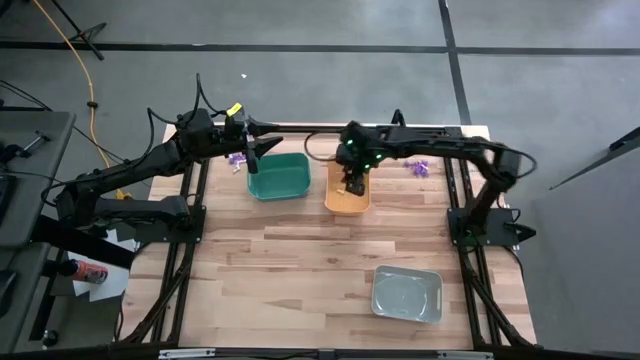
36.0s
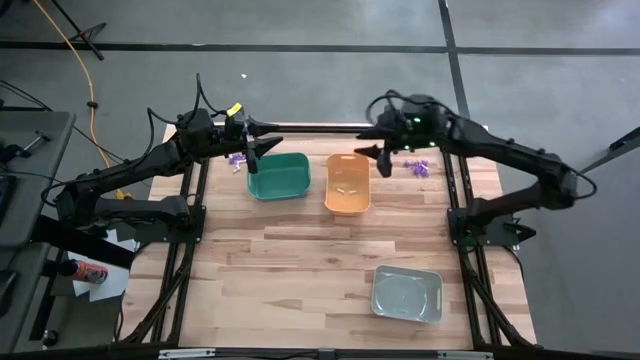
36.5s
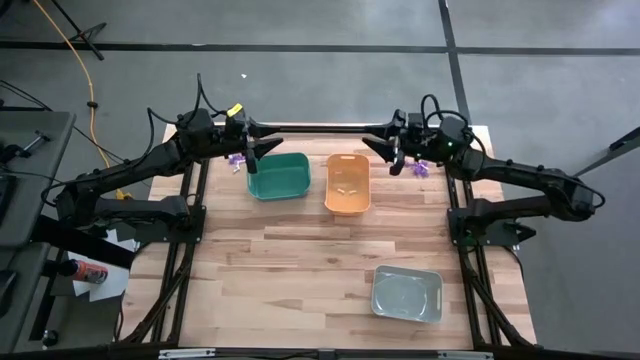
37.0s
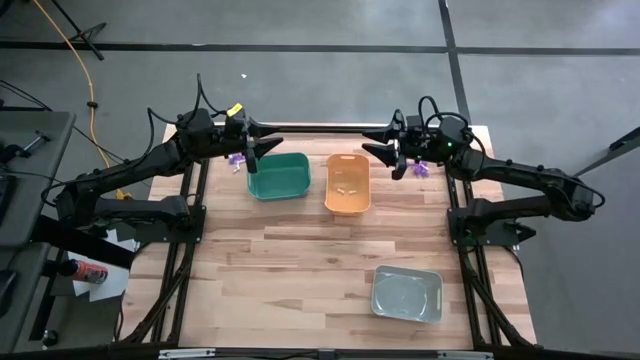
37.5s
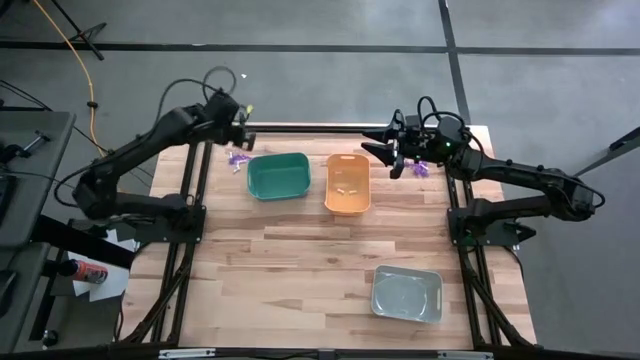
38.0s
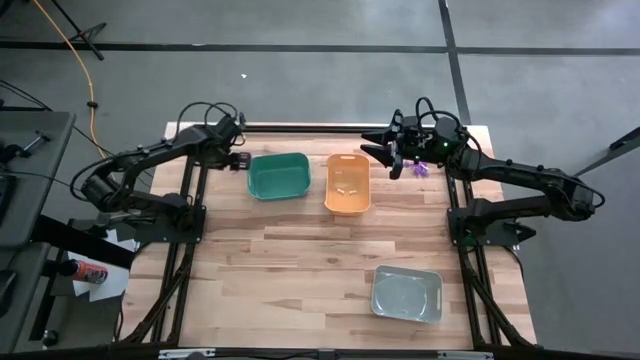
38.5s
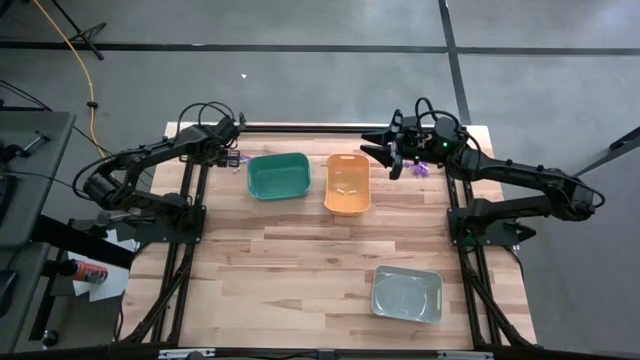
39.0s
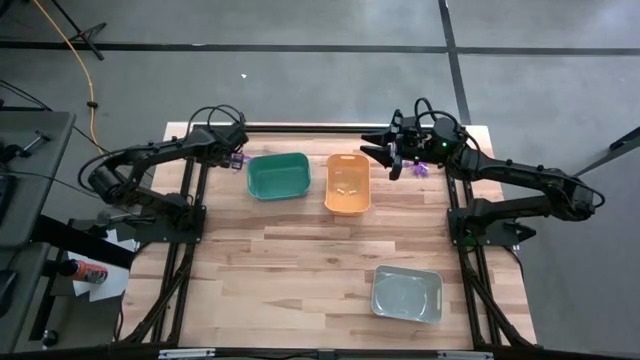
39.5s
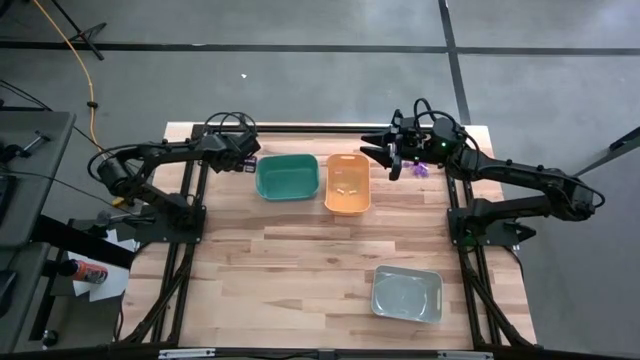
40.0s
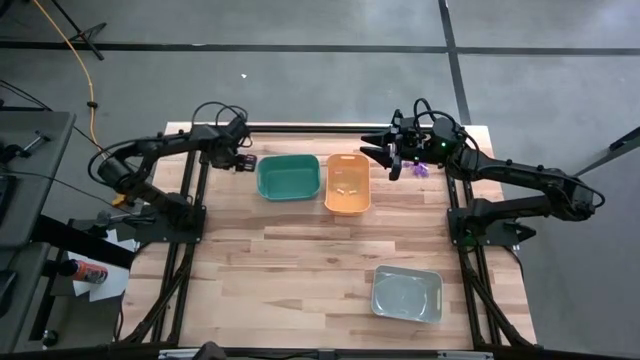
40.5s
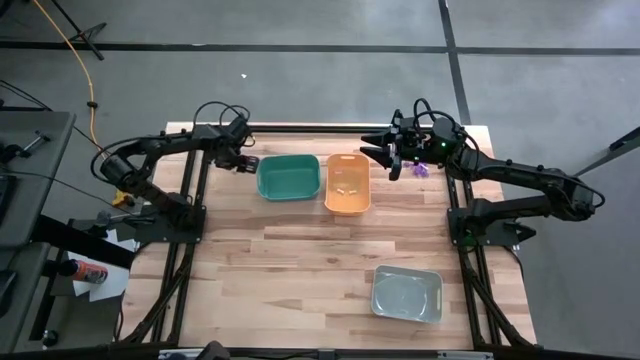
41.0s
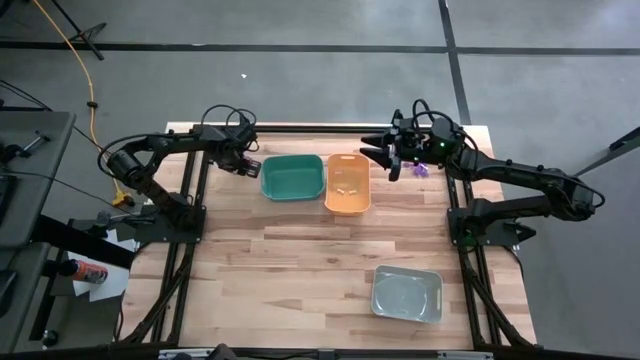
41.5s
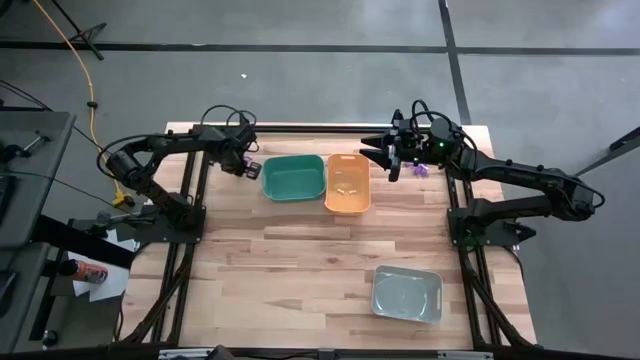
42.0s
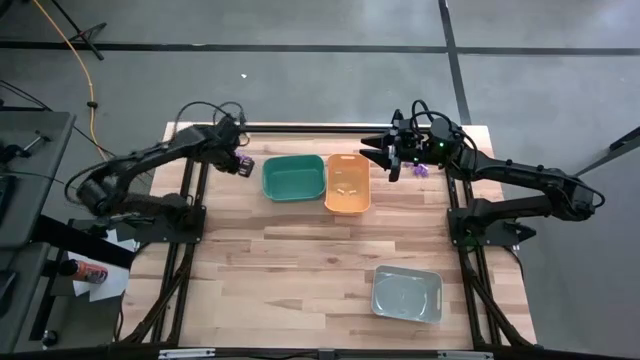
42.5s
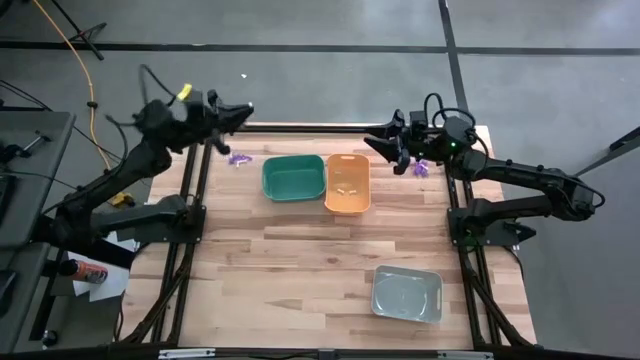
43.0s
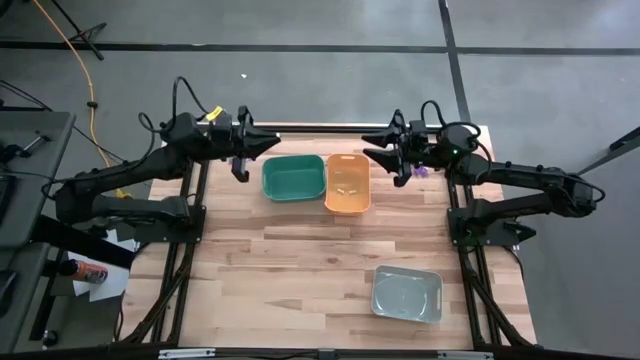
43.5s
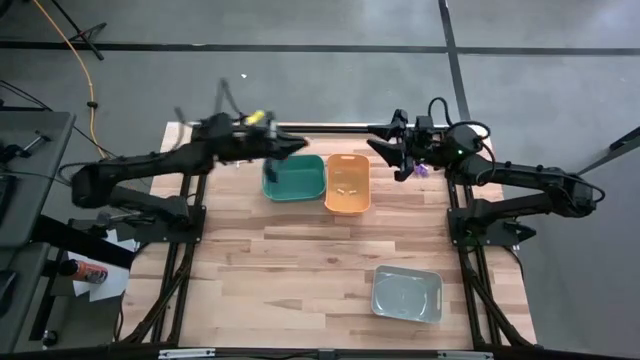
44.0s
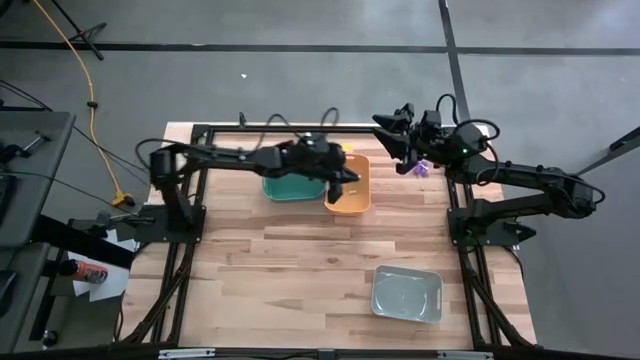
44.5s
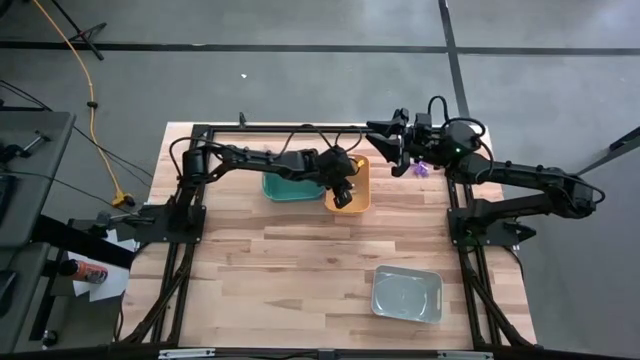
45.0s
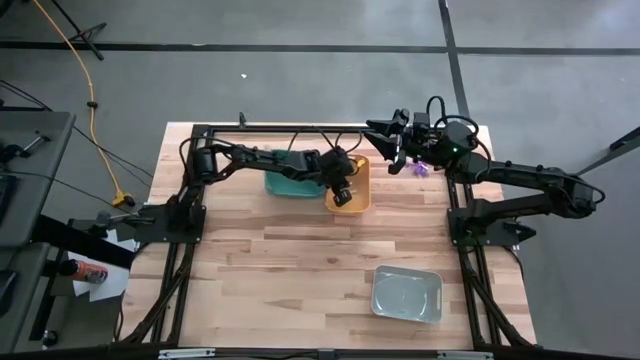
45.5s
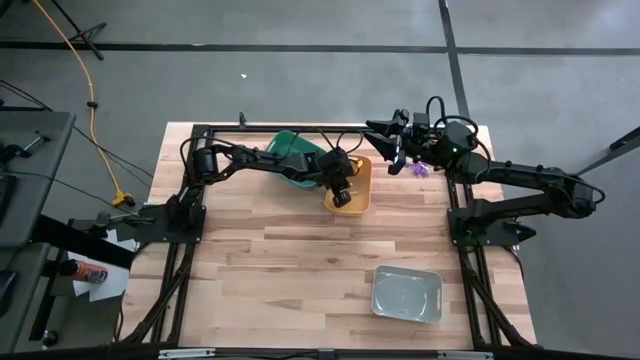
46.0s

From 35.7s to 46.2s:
Task: Sort Halloween decoration
Put the white bone toy into the yellow bin

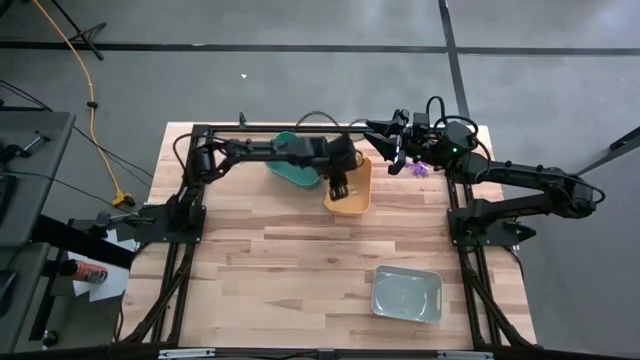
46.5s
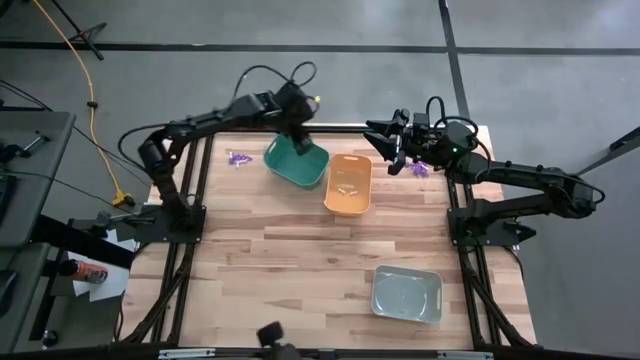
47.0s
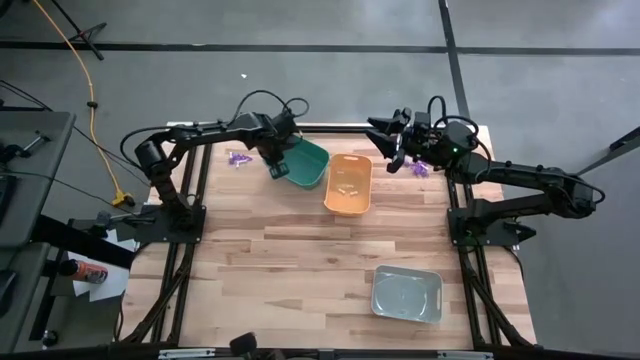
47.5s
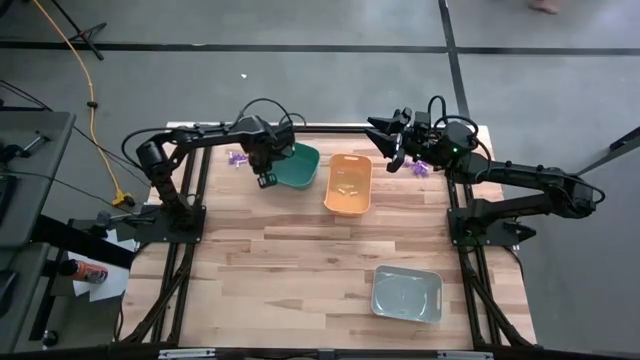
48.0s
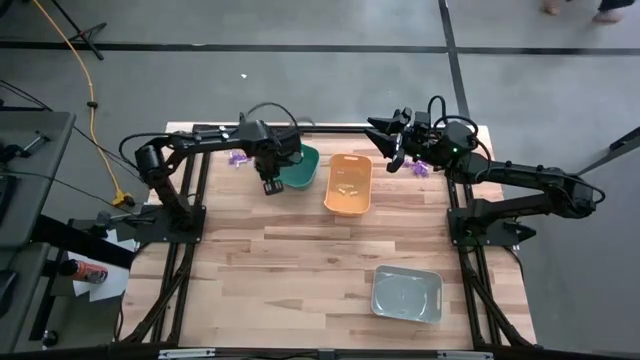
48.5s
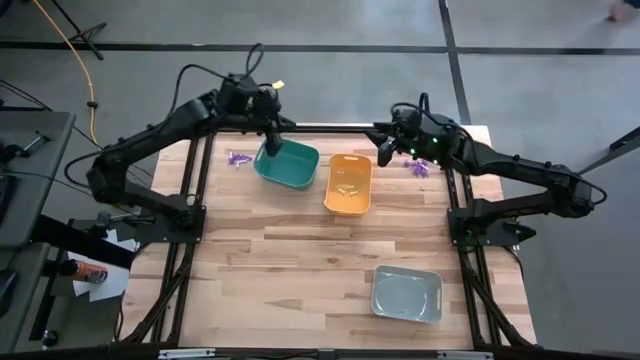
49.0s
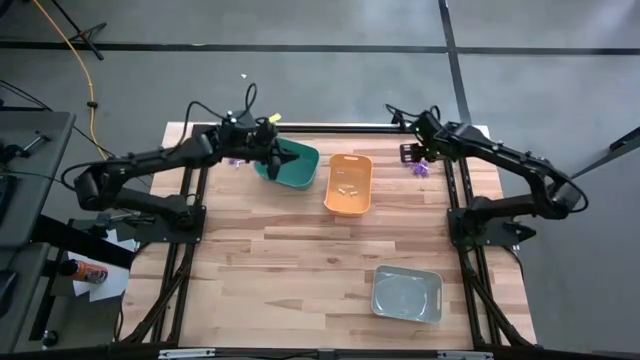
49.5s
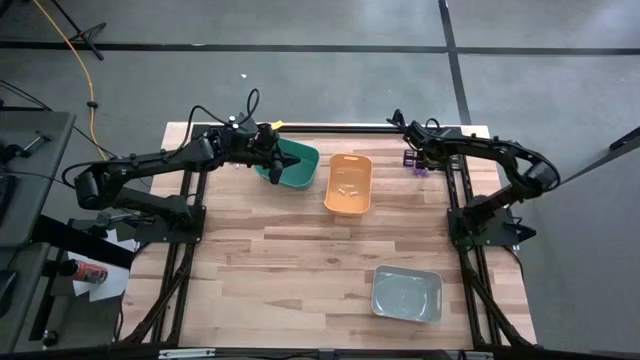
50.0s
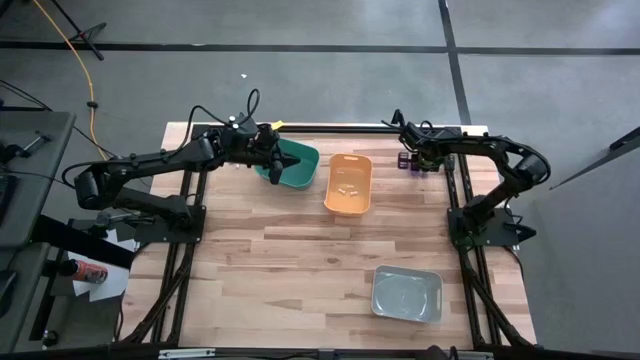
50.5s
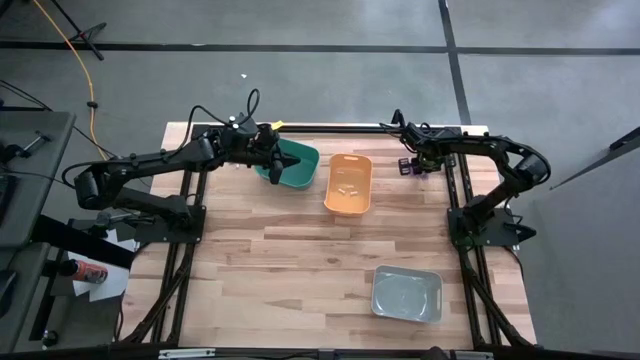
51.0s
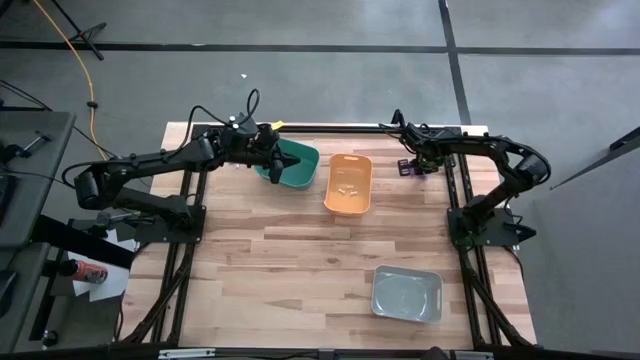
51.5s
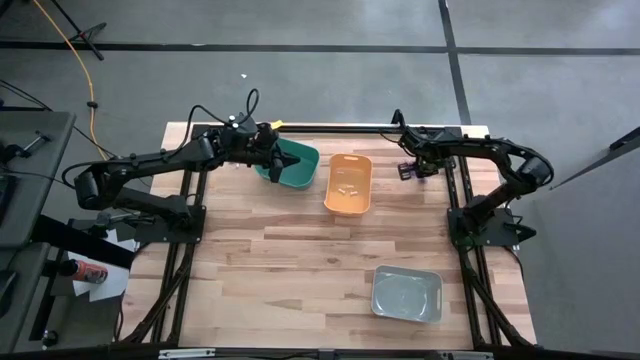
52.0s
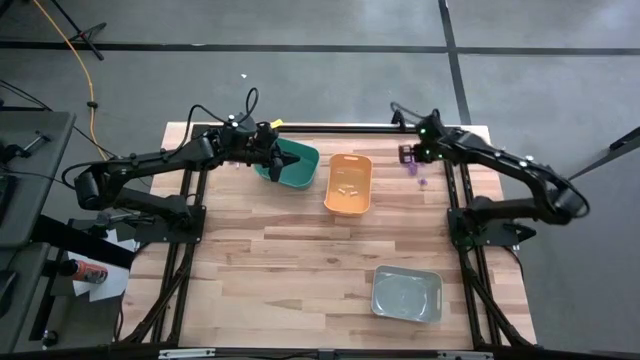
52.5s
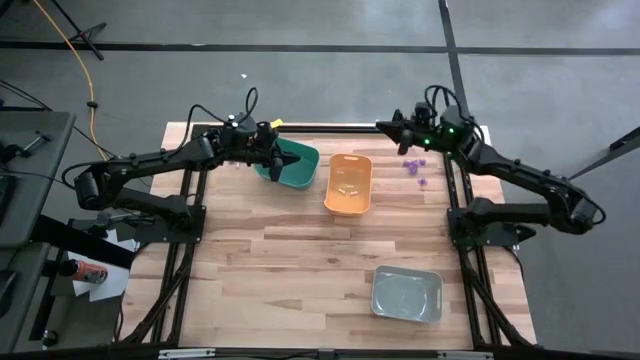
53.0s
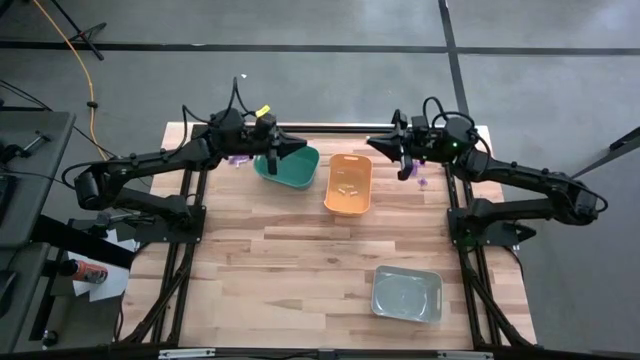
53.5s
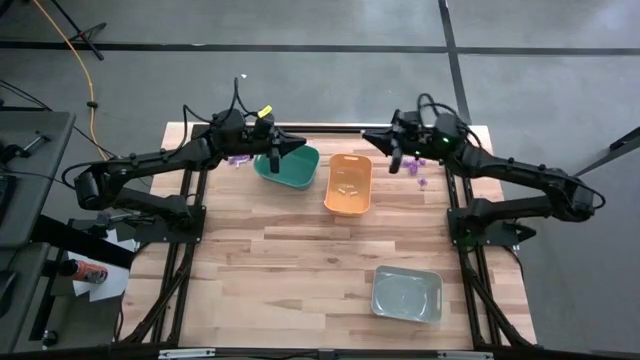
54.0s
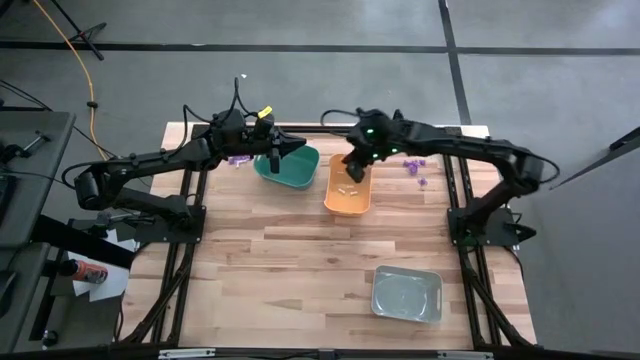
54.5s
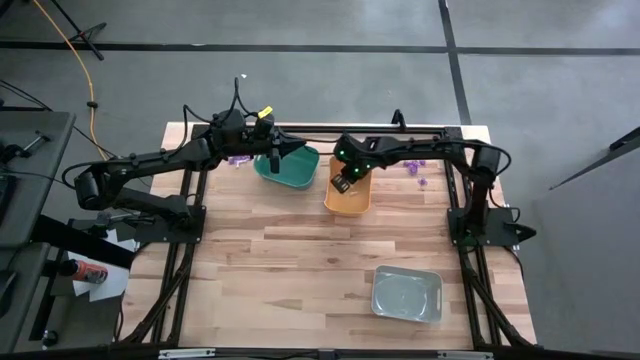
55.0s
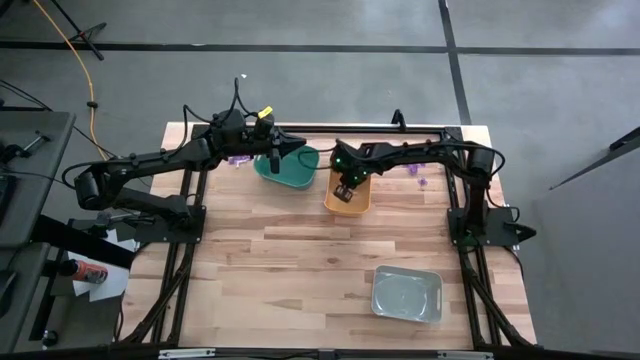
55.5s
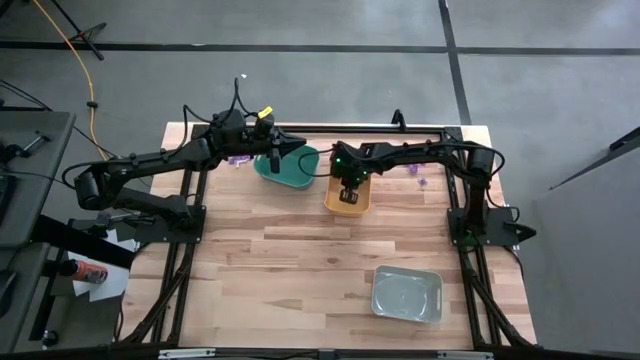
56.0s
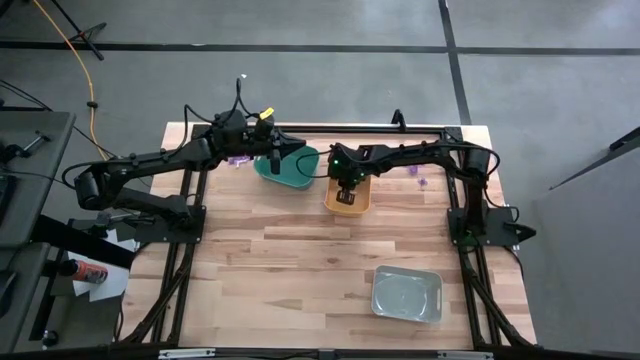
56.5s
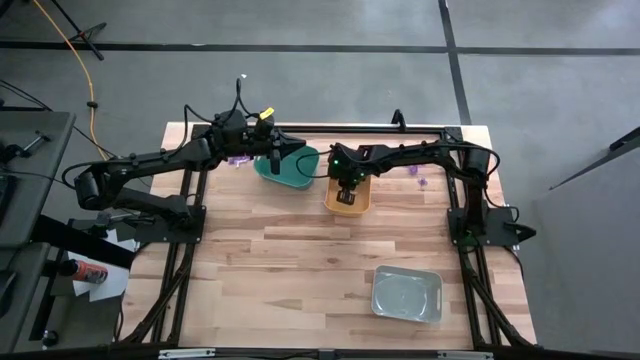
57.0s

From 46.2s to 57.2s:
Put the white bone toy into the yellow bin

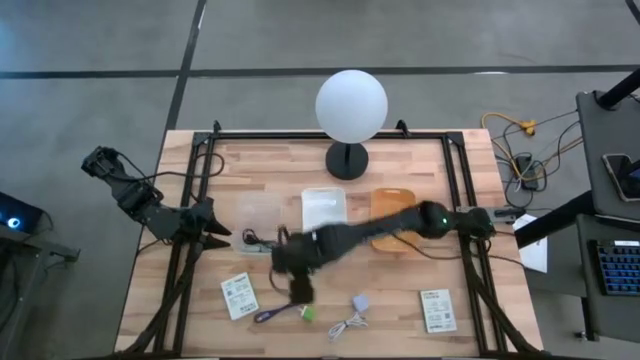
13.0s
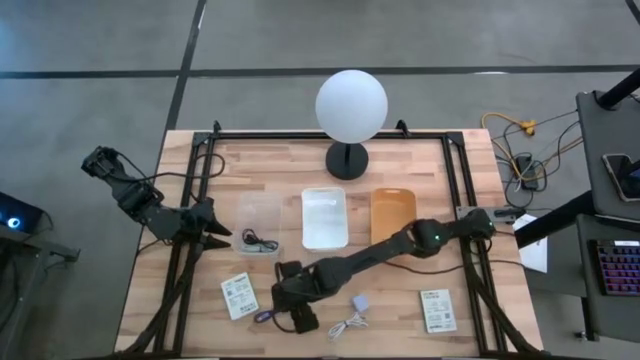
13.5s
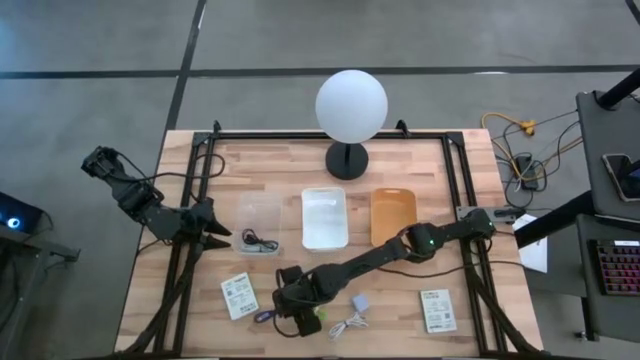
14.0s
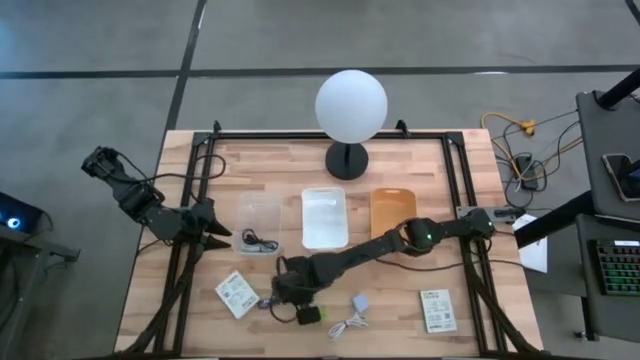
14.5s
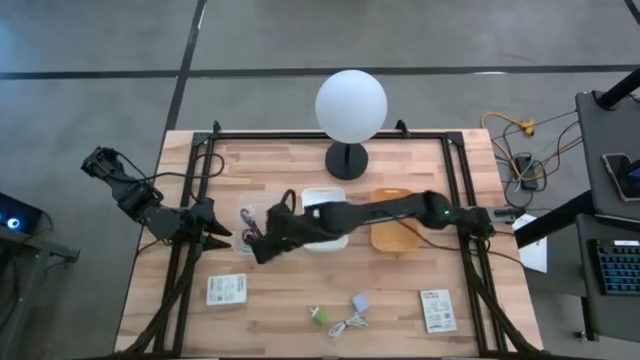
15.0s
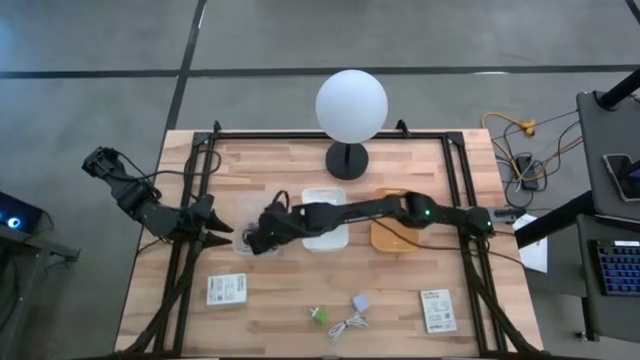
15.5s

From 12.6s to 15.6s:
Task: Pick and place items into bin
Put the blue charger cable into the transparent bin
